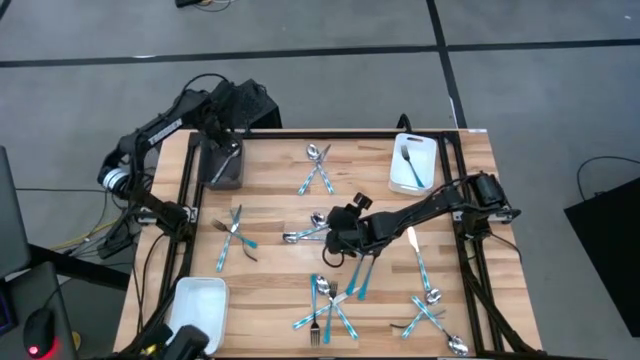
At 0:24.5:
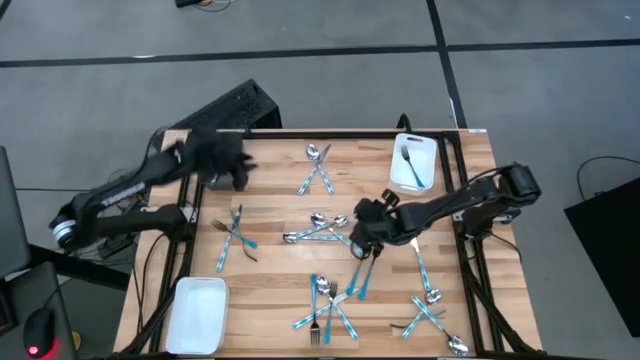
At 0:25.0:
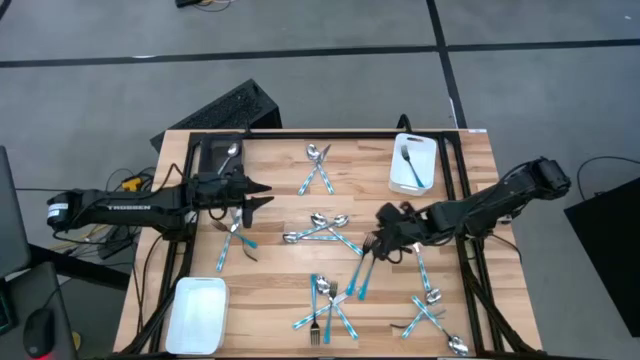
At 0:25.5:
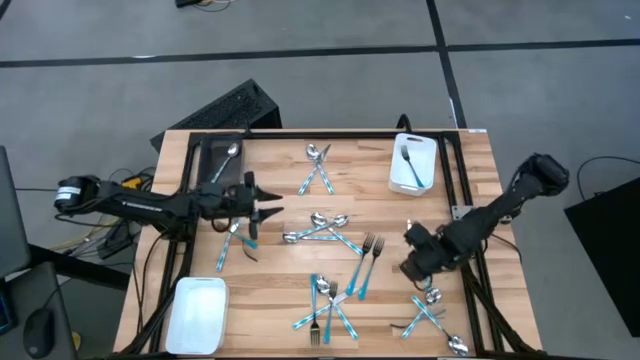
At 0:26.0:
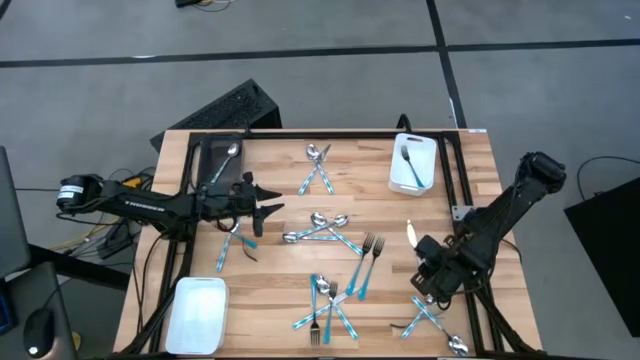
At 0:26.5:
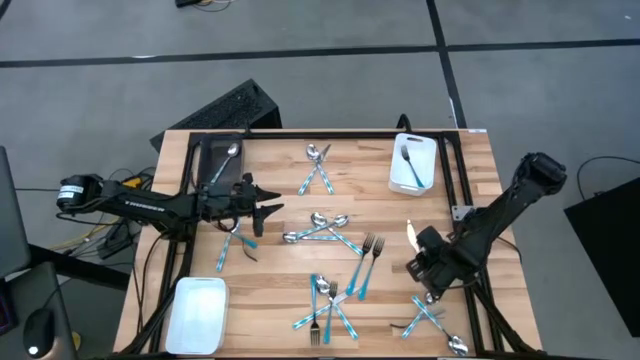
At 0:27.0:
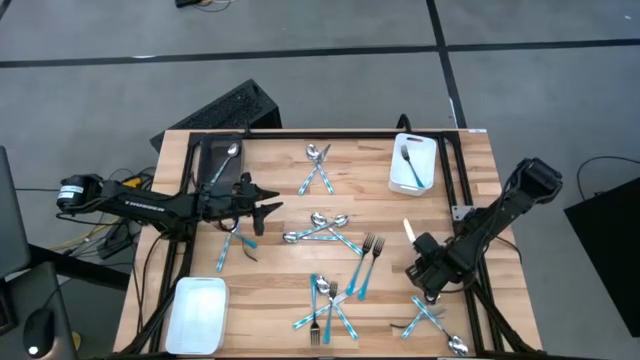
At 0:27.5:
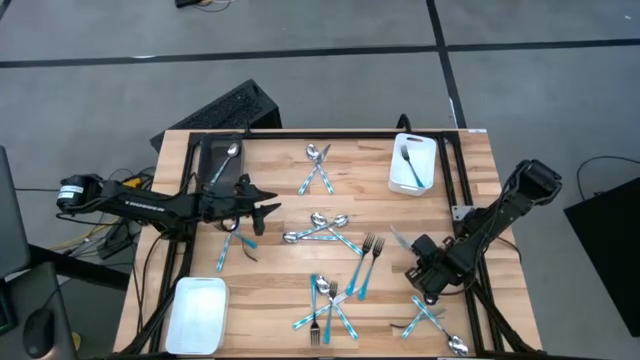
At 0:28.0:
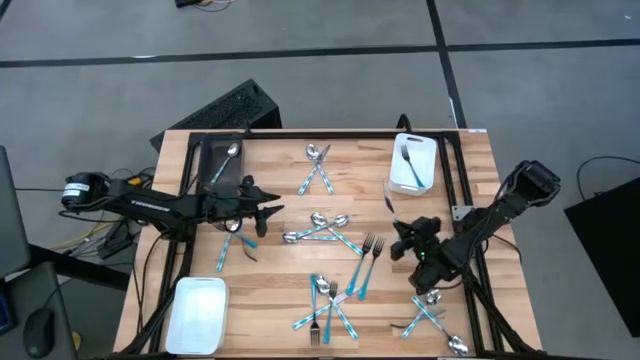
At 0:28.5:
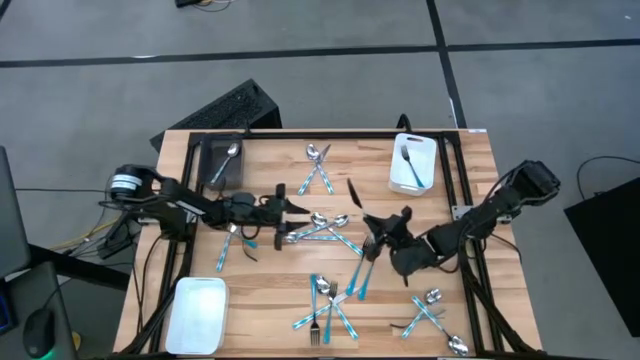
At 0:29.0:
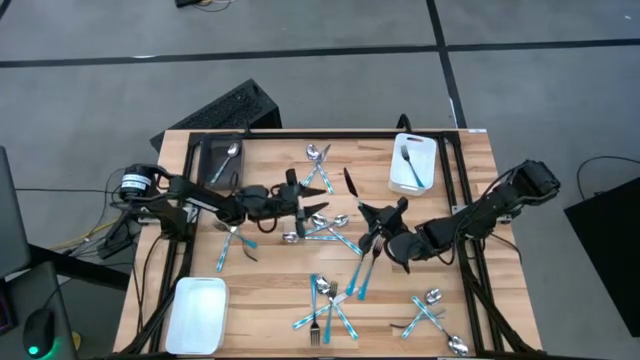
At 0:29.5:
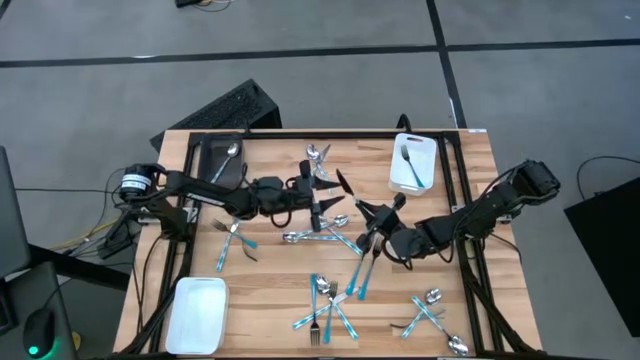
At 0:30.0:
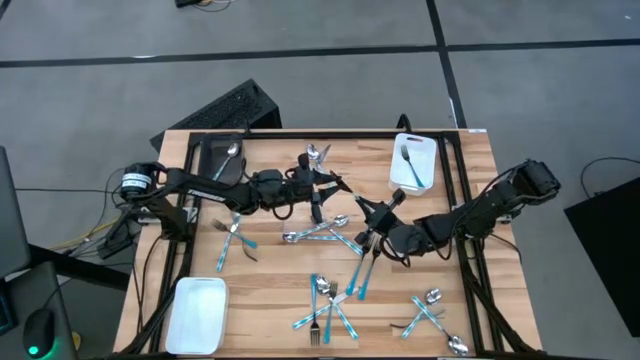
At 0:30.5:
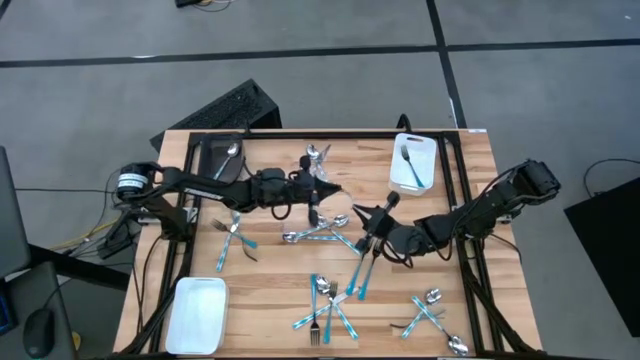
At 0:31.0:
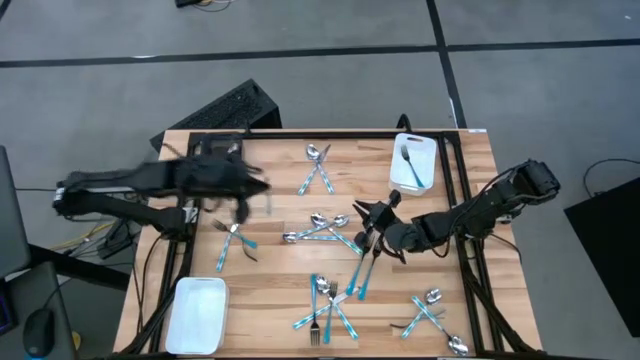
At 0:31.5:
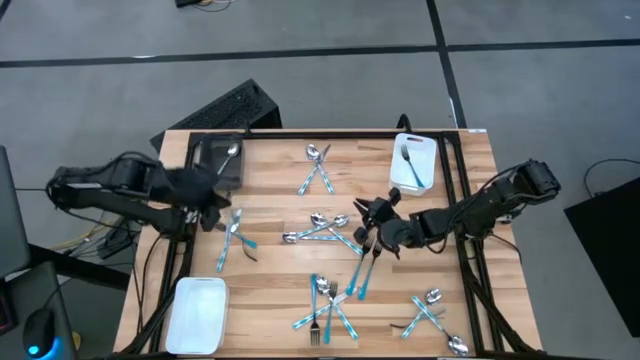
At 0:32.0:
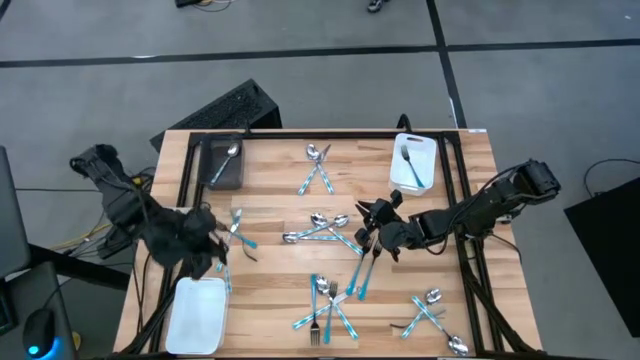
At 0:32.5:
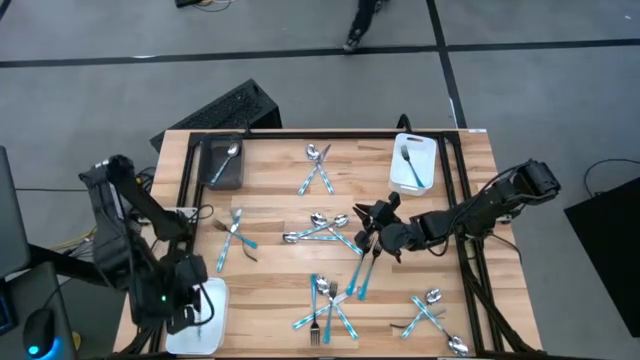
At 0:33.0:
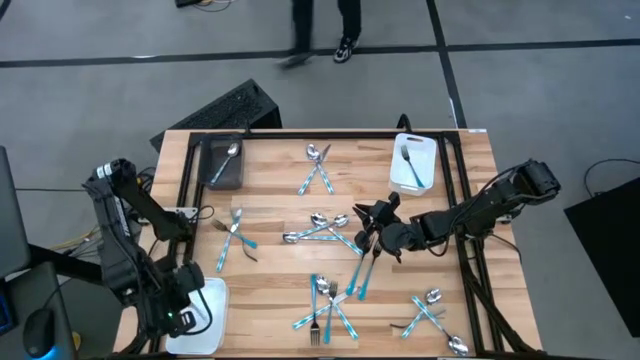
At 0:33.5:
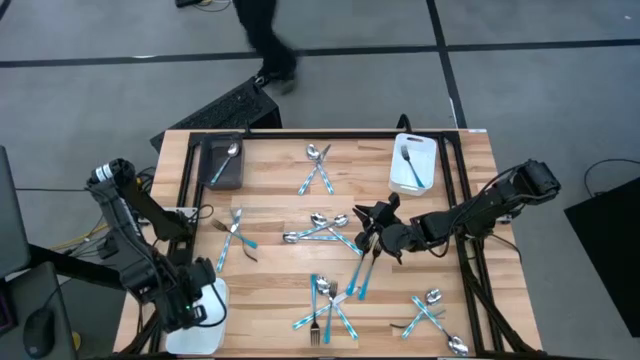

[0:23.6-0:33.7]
Task: Sort silverware by color (type)
Put the light blue table knife into the bottom white bin

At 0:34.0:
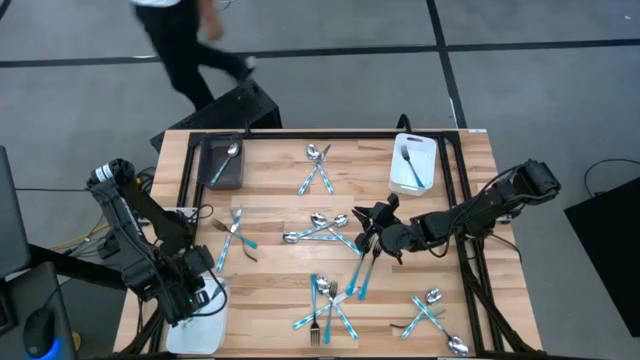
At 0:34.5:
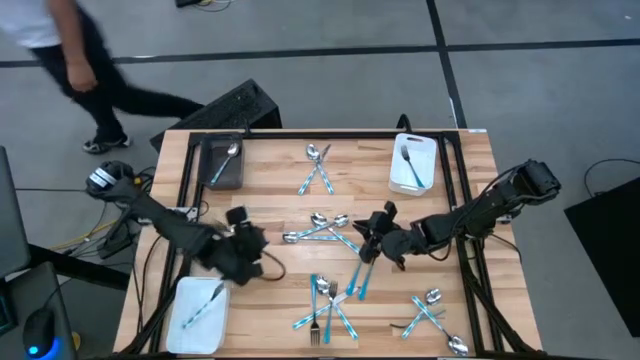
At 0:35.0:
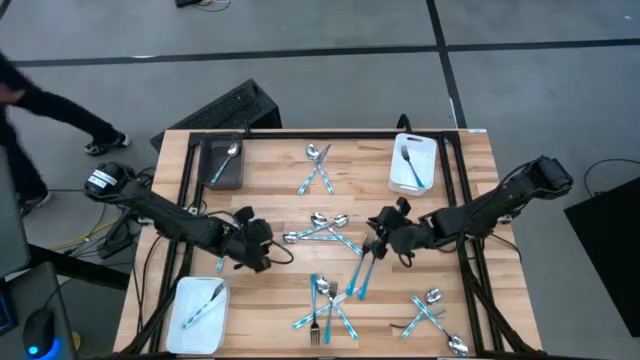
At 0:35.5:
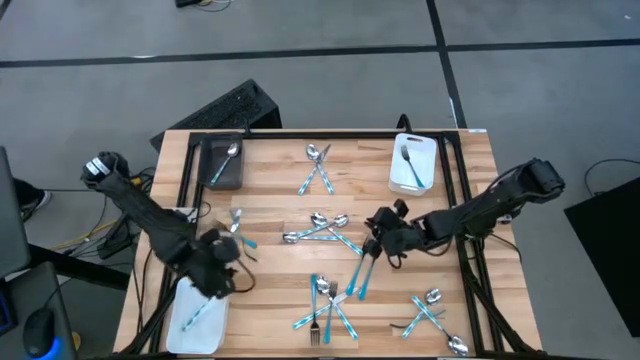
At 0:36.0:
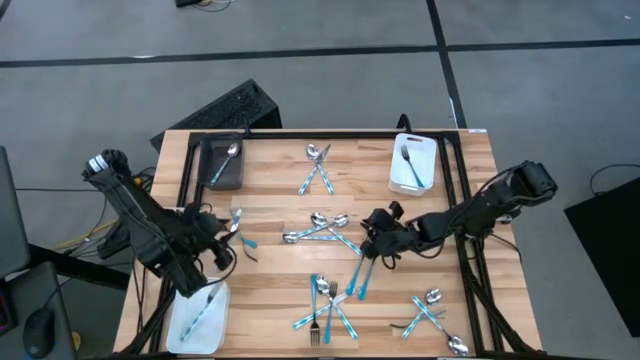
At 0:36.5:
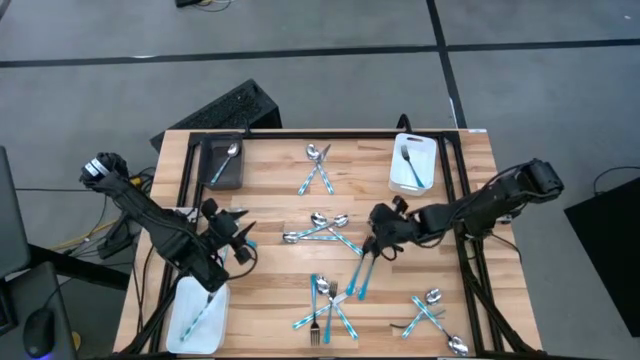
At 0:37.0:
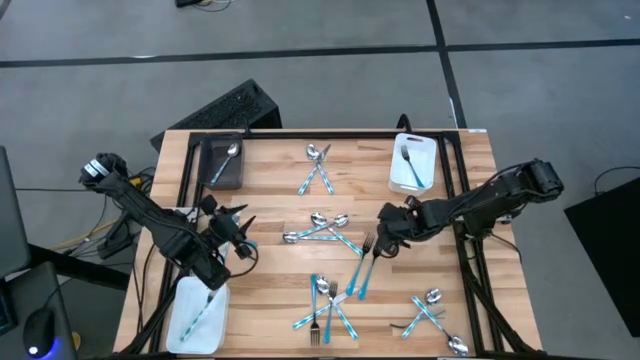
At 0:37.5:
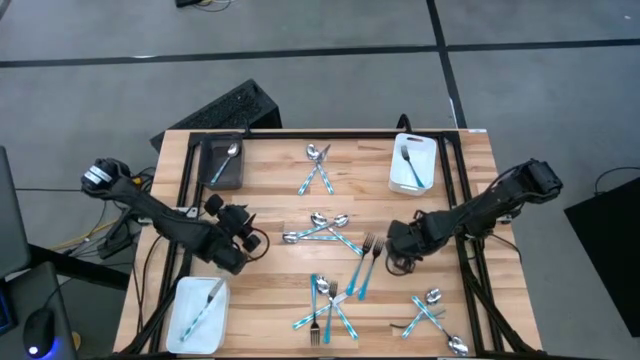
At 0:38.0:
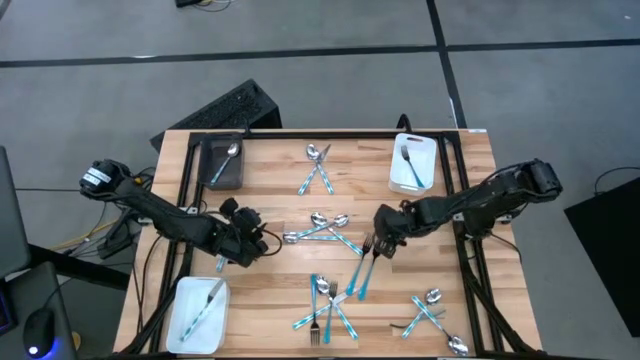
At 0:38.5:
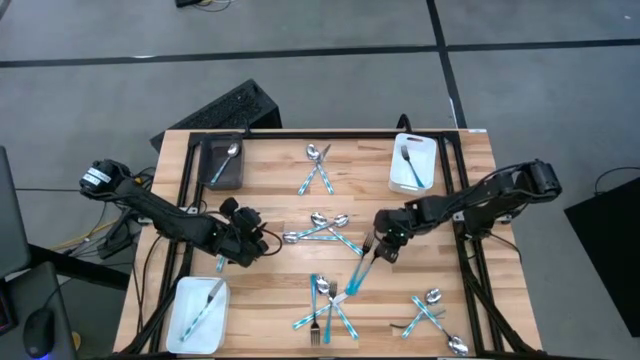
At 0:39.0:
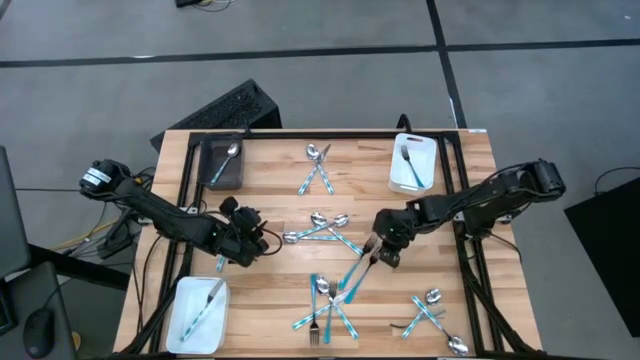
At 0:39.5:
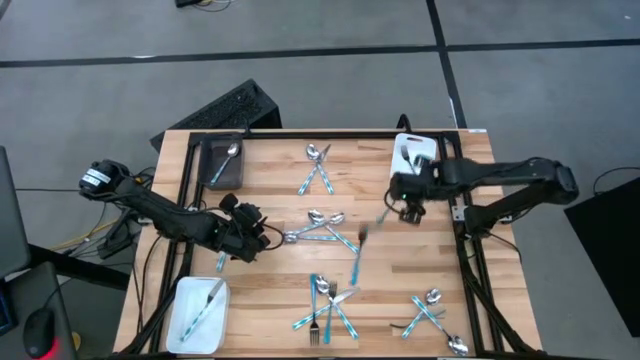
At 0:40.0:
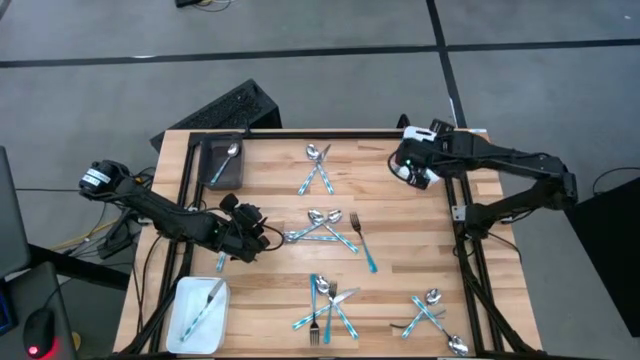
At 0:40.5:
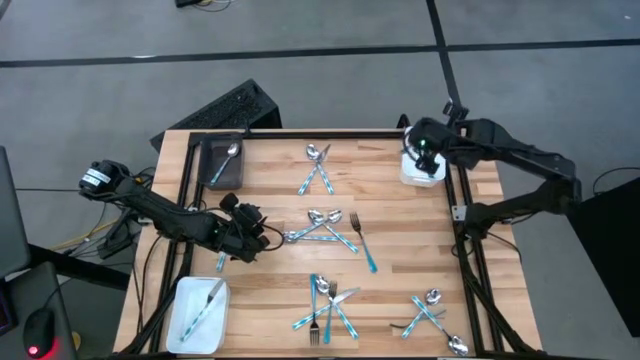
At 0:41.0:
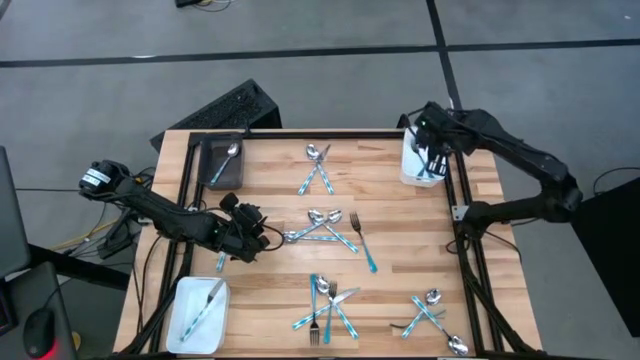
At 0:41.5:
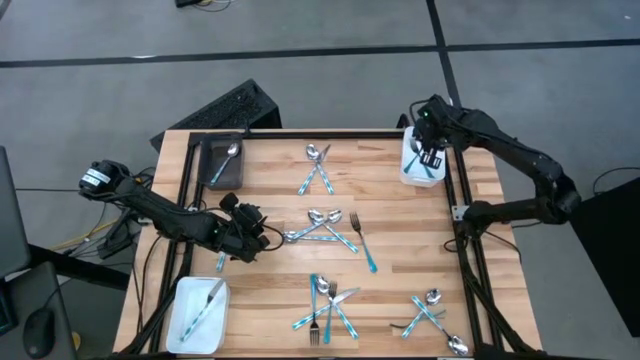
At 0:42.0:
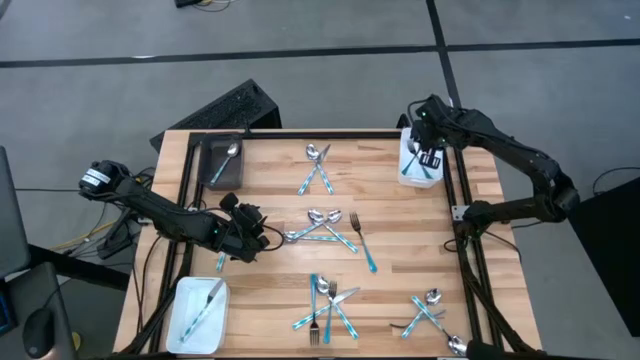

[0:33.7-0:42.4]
Put the blue fork into the top white bin

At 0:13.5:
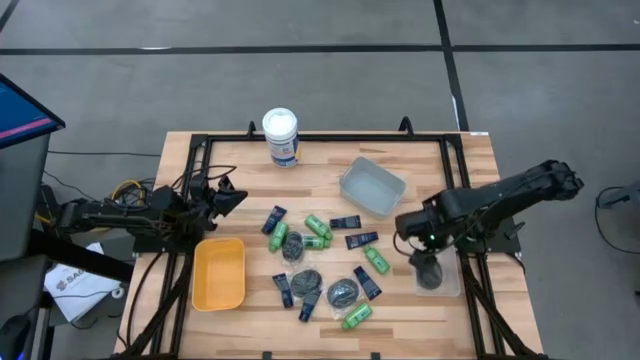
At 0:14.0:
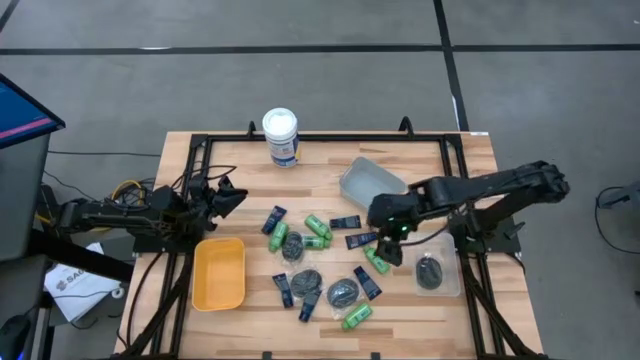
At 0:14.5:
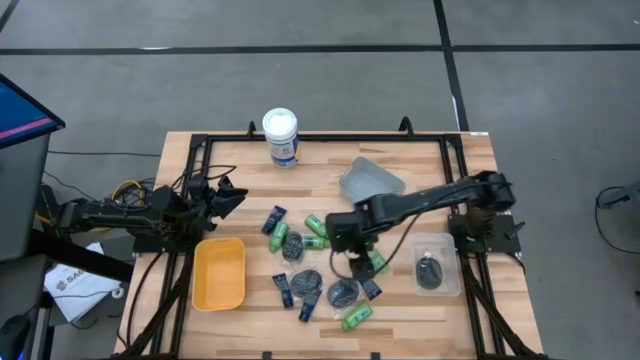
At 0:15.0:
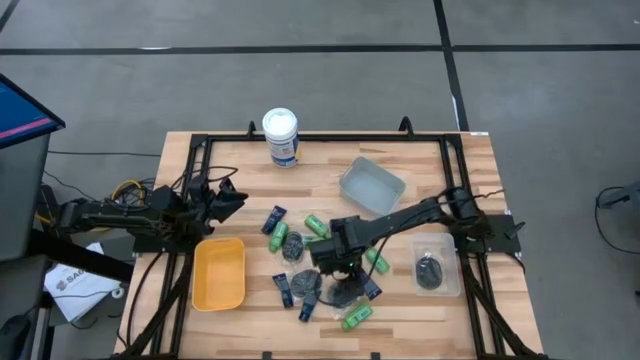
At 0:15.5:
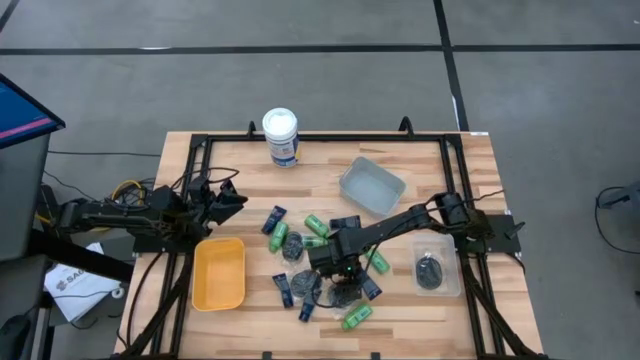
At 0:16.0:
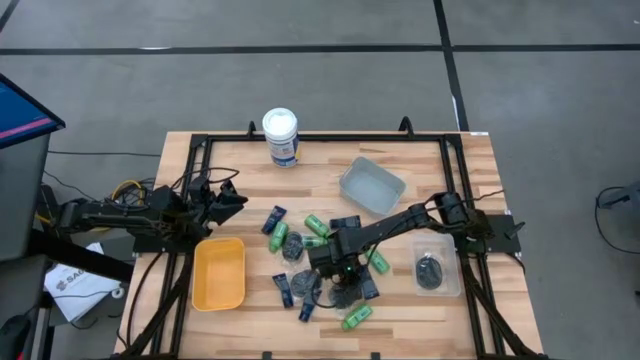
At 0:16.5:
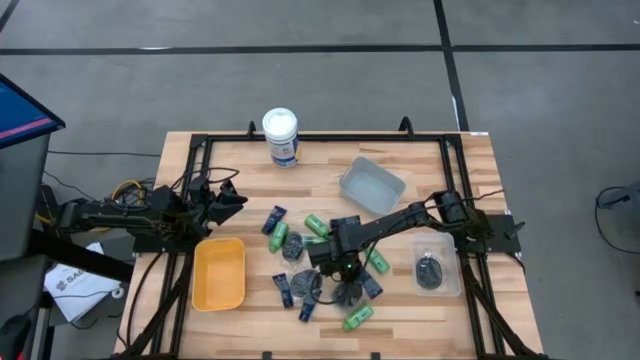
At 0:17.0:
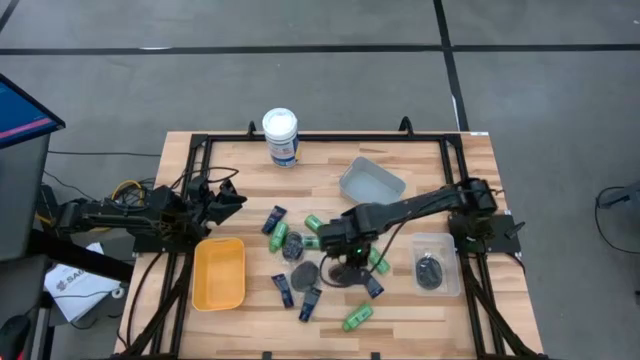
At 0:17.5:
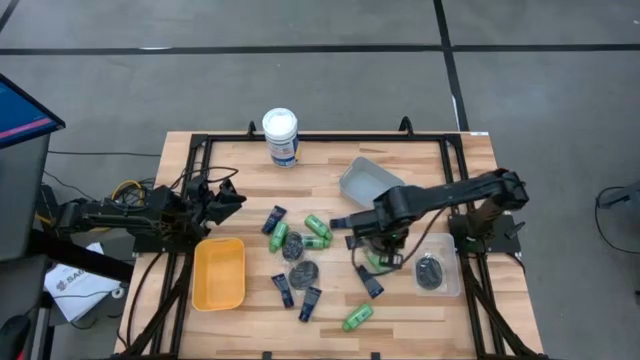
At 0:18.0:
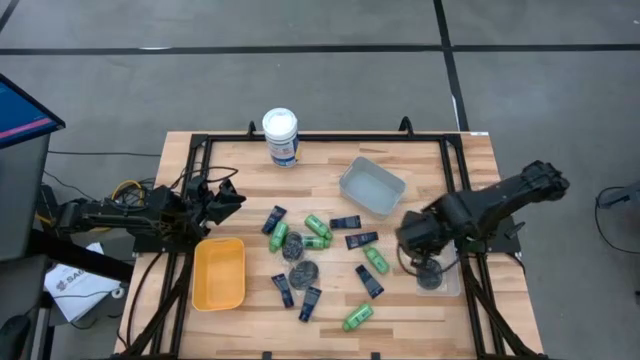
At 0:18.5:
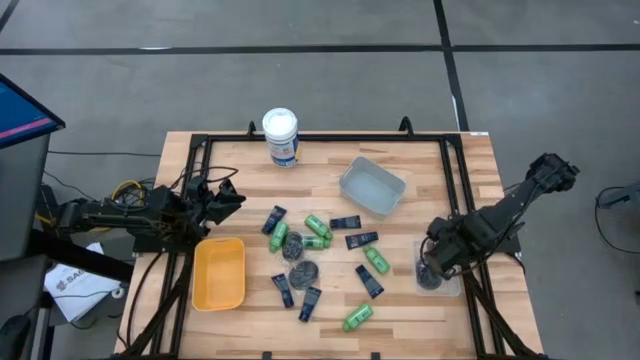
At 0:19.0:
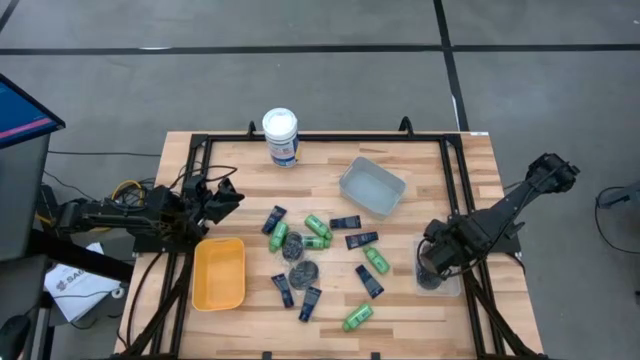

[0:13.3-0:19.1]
Task: Pick & Place Travel size toiletries
Put the black hairbrush into the transparent bin
